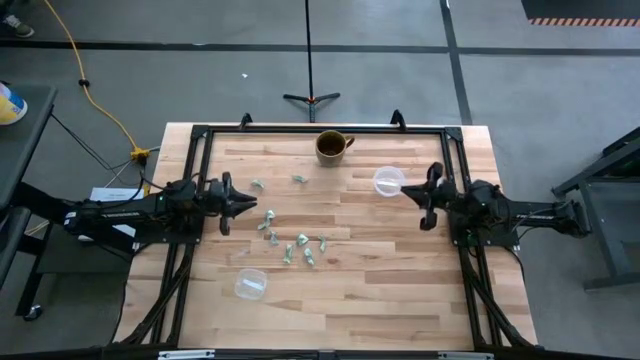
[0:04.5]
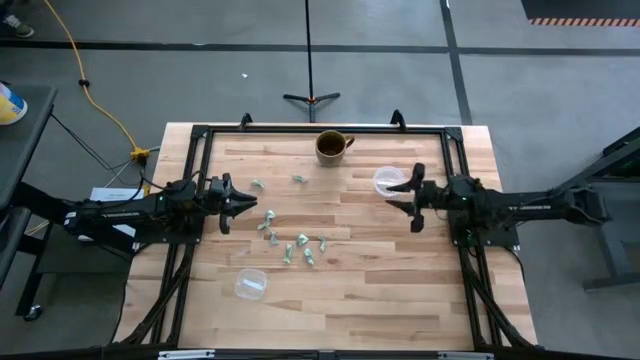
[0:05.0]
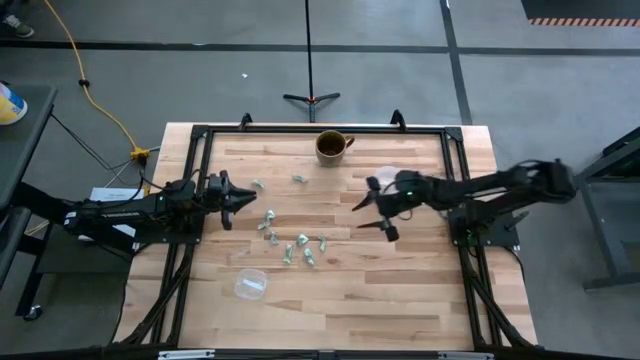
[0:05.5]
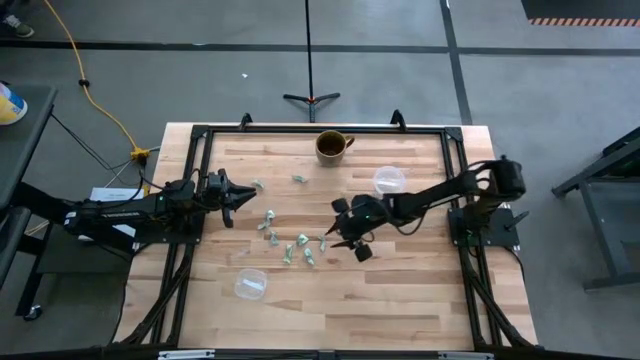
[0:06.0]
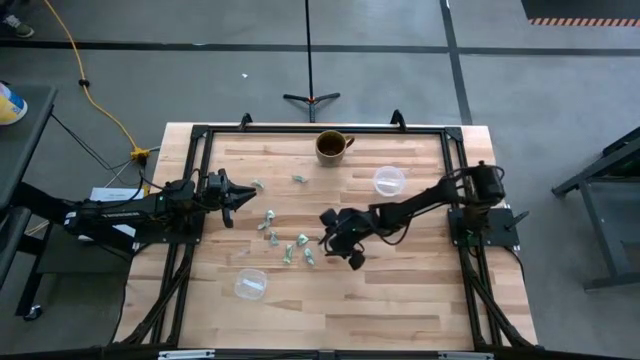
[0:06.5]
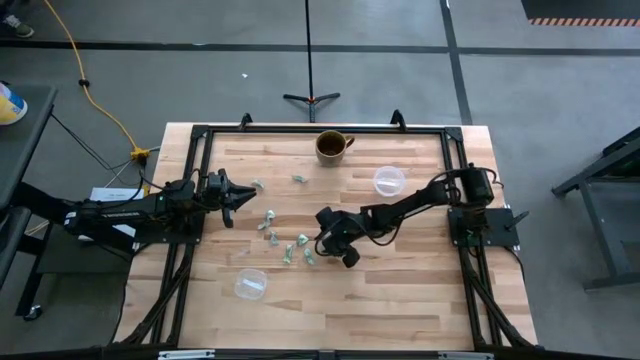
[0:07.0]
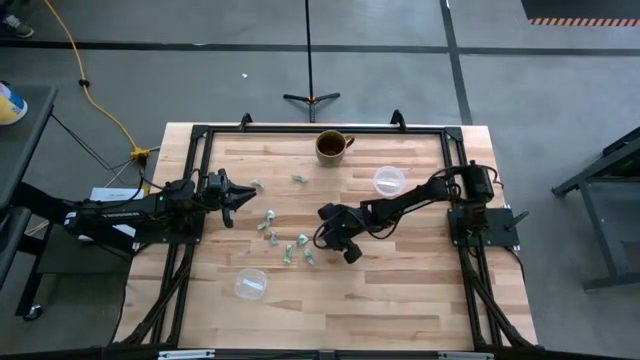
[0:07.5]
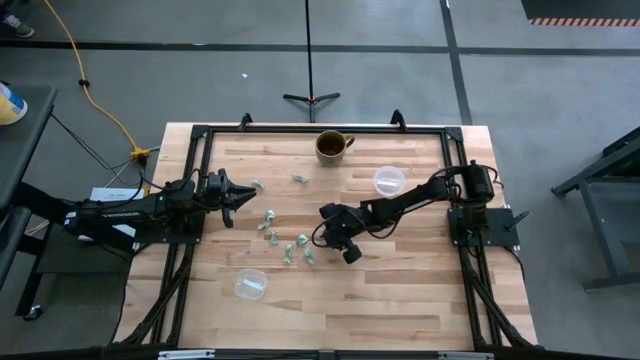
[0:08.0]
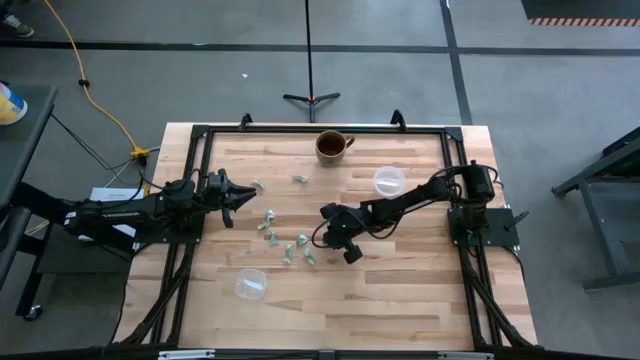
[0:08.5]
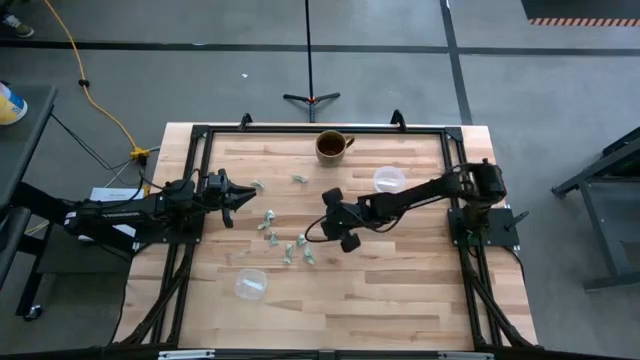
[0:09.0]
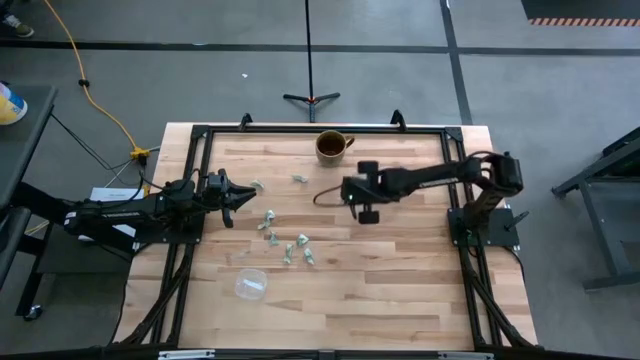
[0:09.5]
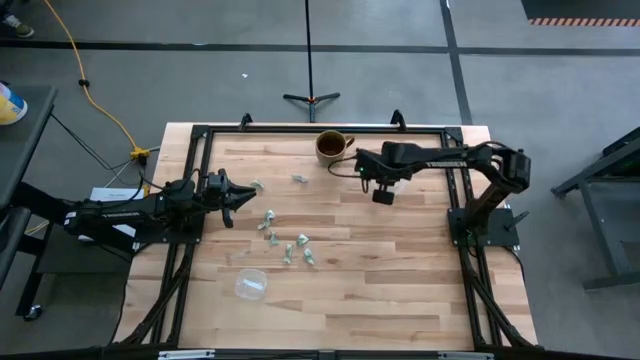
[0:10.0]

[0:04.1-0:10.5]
Task: Pick and place Stevia / Truvia into bins
Put the stevia packet into the top transparent container

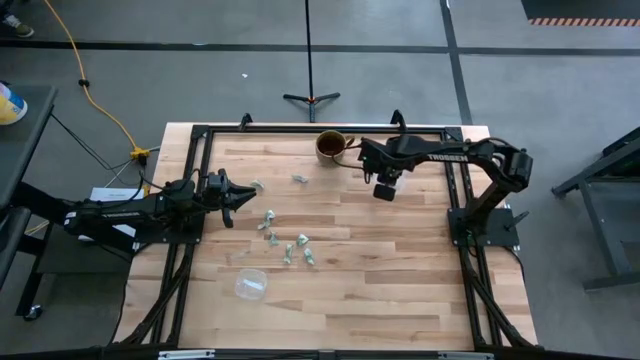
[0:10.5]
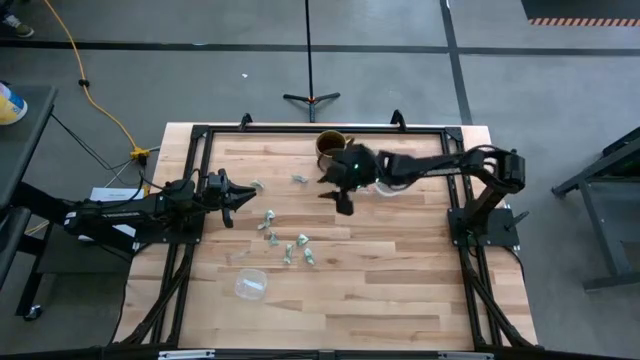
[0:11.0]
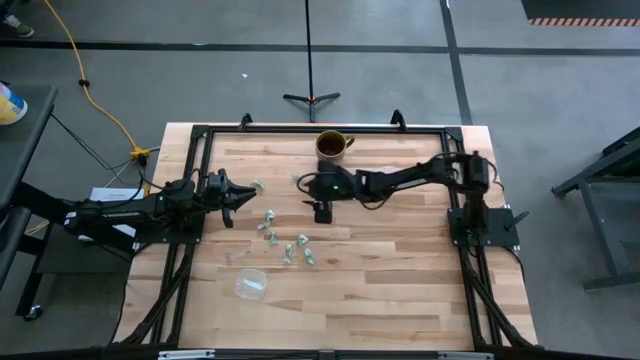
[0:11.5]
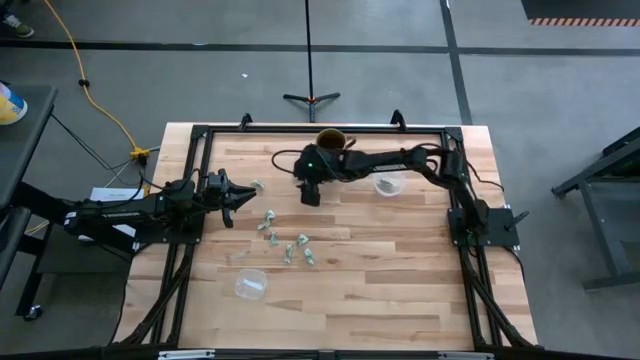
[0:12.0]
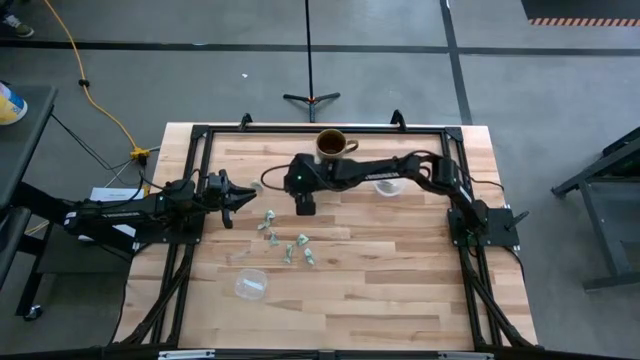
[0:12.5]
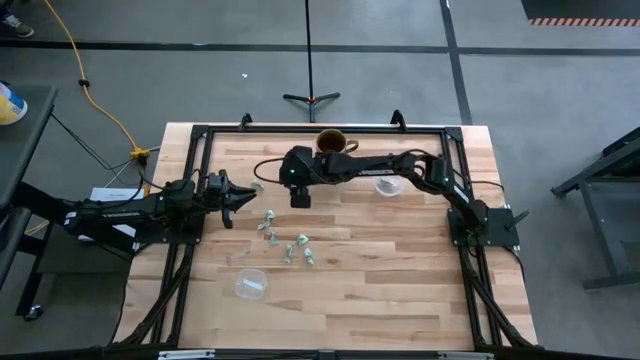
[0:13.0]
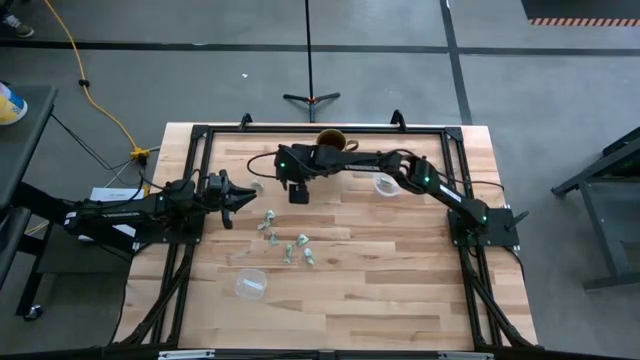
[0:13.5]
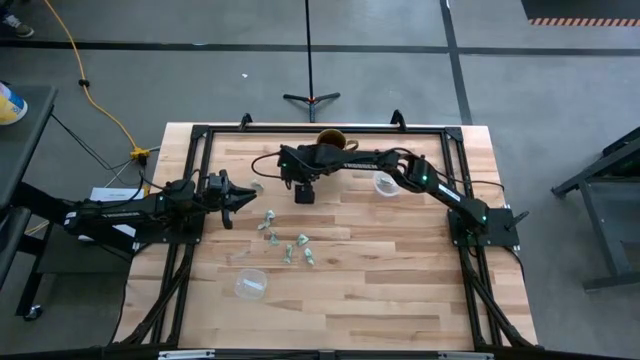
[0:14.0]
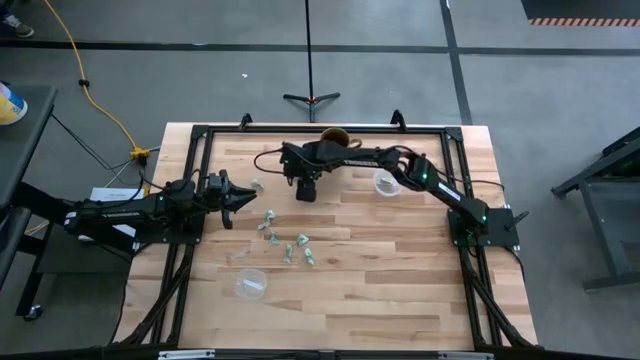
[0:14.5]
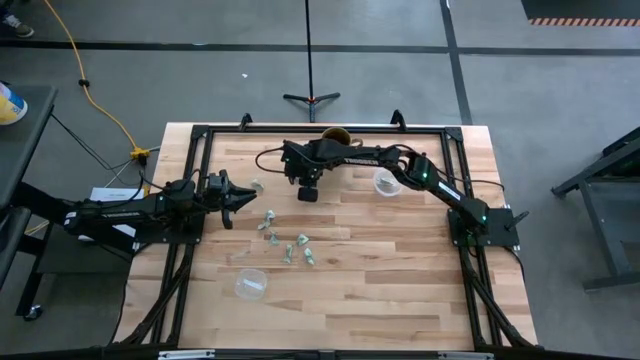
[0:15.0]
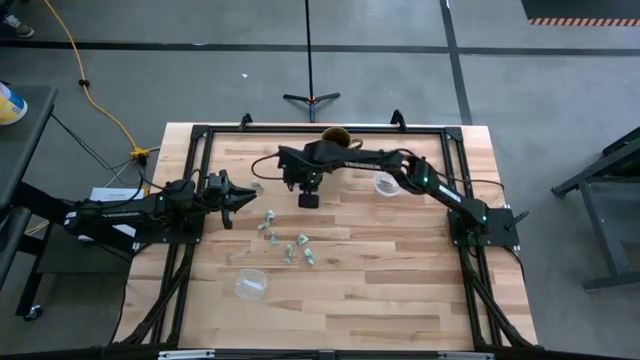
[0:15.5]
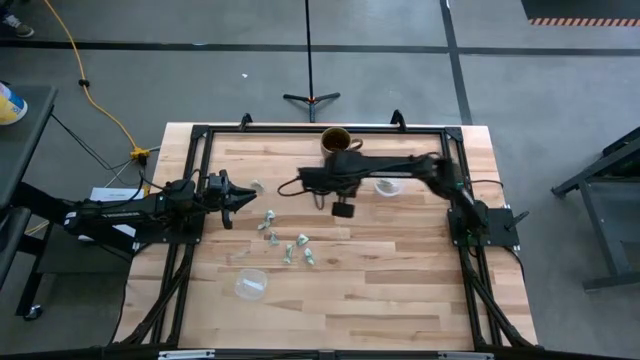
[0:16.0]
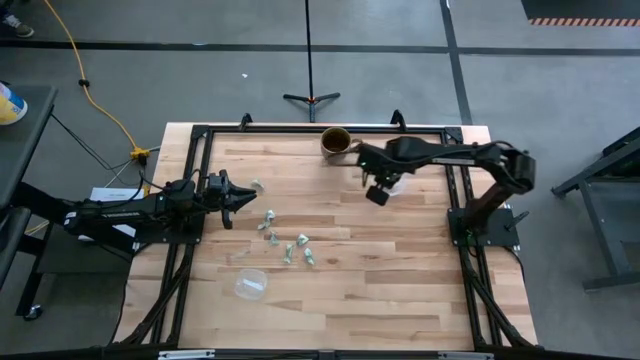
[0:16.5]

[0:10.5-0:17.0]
Put the stevia packet into the top transparent container

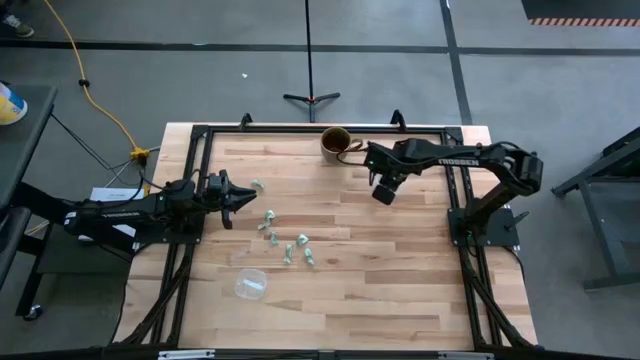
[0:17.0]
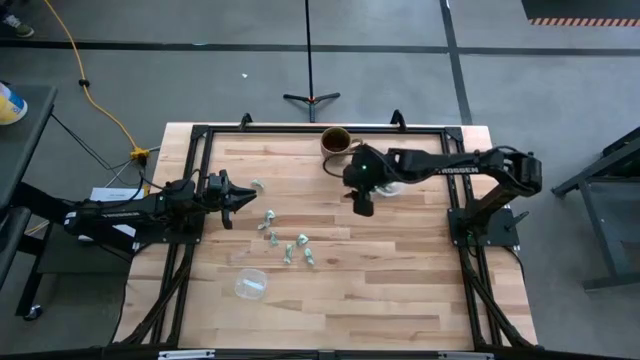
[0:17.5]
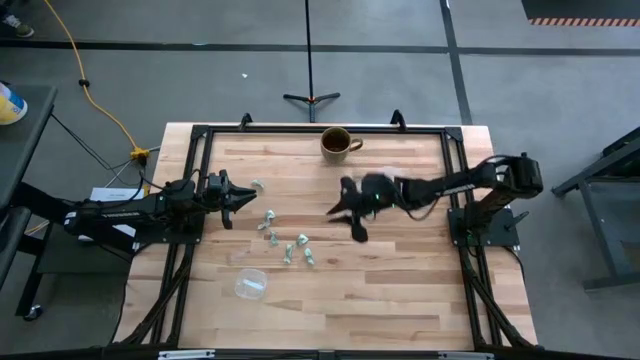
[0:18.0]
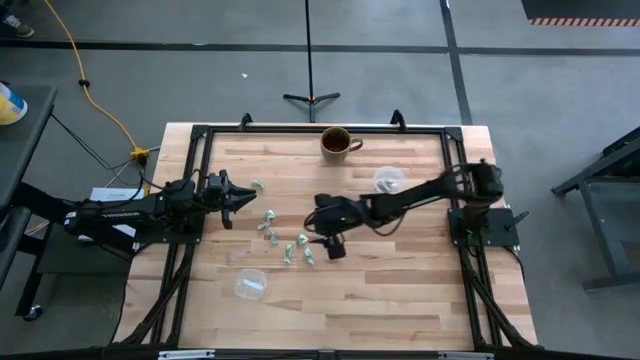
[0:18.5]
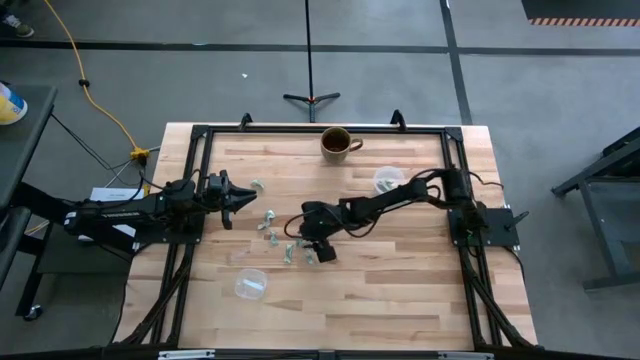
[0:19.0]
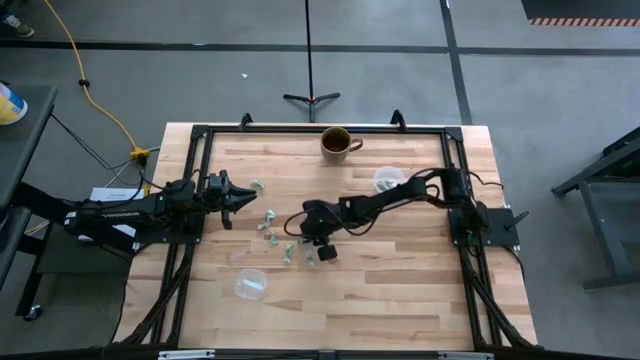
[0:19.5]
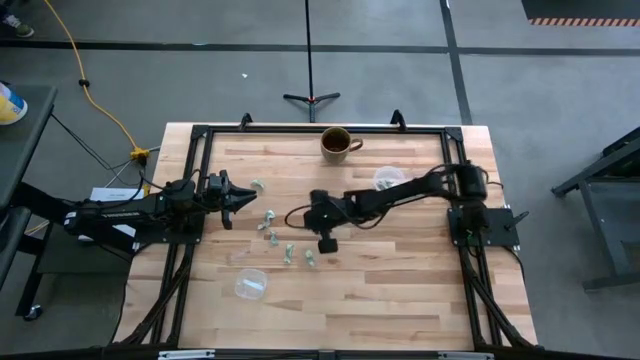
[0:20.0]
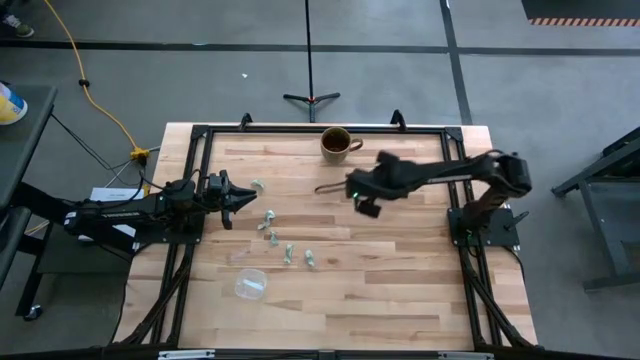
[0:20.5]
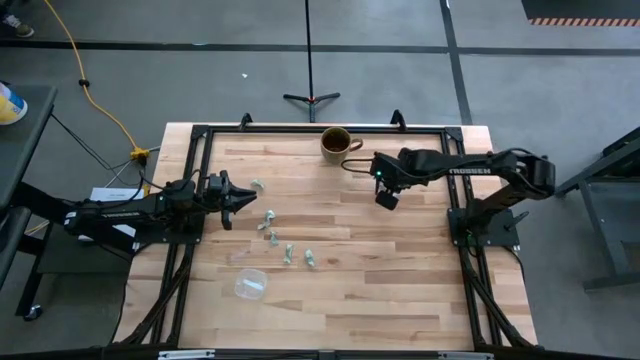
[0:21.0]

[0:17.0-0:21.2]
Put the stevia packet into the top transparent container

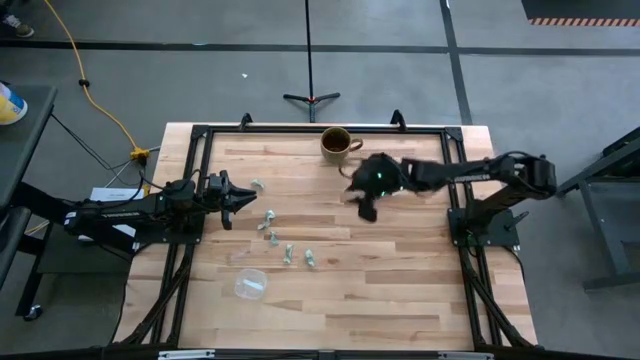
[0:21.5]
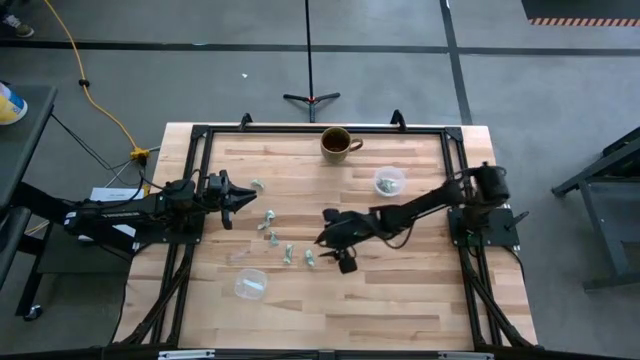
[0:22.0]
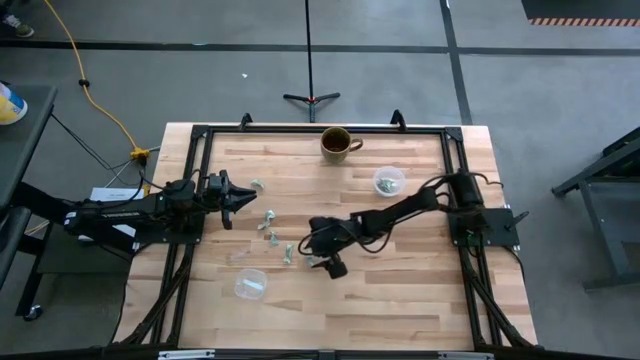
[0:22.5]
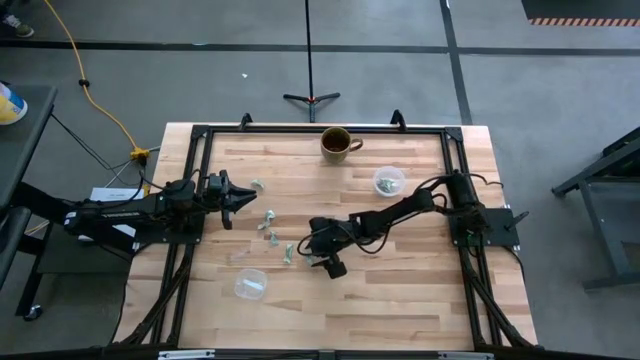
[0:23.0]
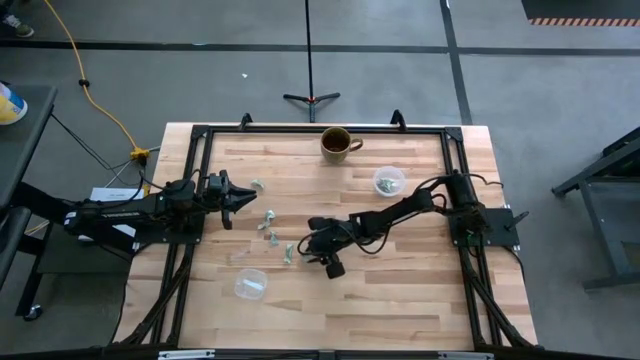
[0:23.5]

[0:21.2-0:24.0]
Put the stevia packet into the top transparent container

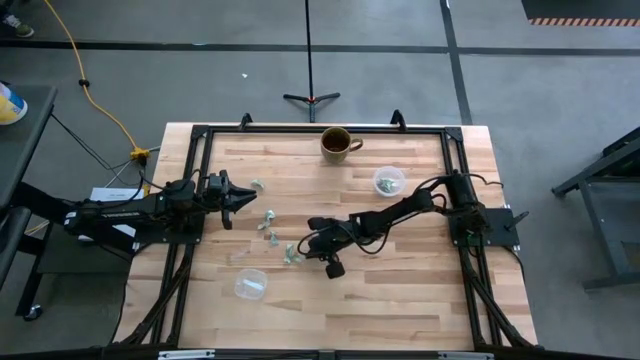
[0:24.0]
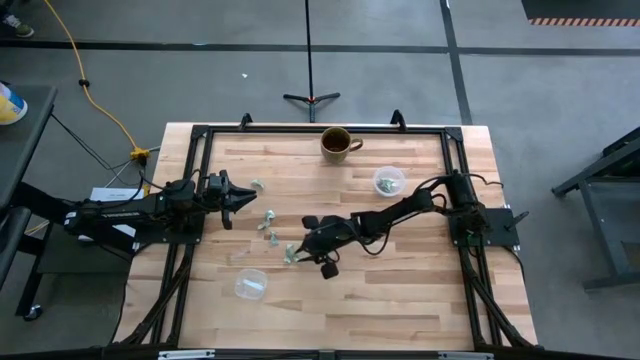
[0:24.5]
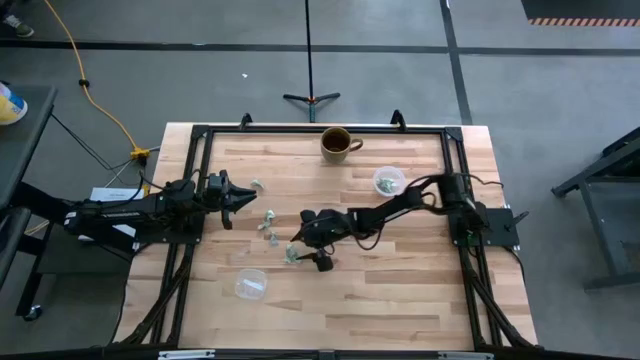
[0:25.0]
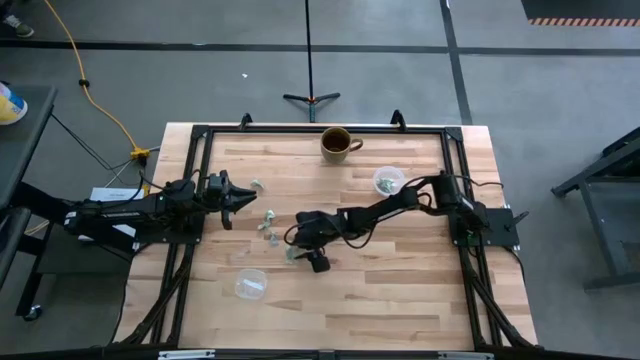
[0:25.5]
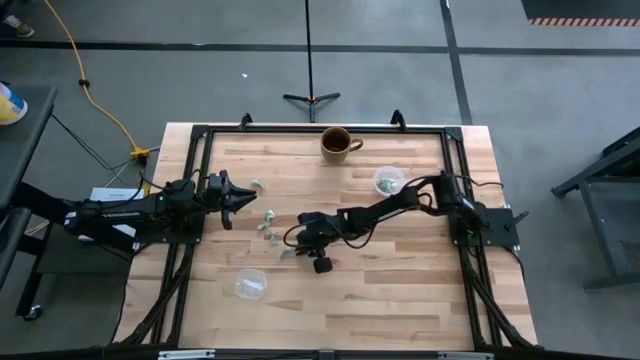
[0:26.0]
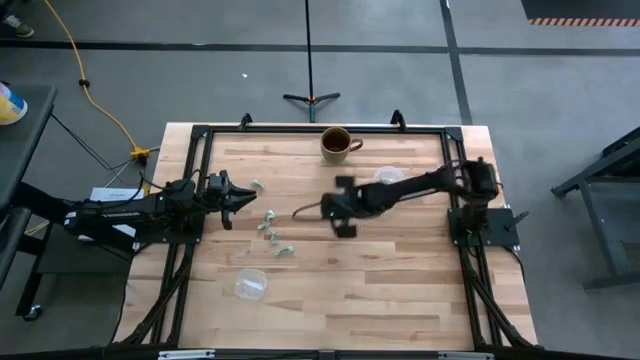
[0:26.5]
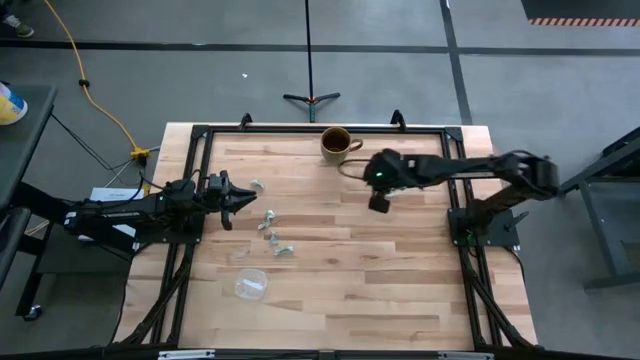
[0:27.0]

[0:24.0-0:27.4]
Put the stevia packet into the top transparent container
